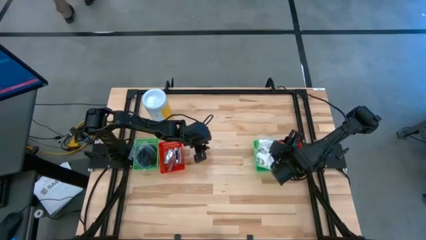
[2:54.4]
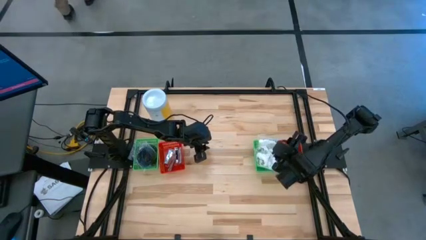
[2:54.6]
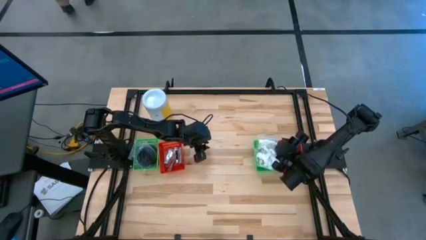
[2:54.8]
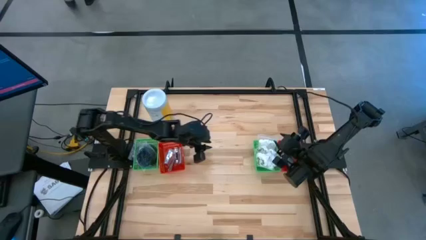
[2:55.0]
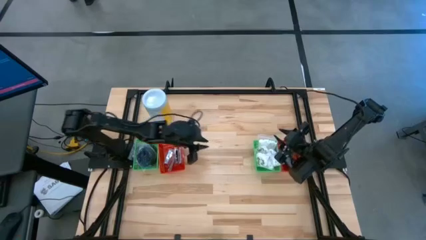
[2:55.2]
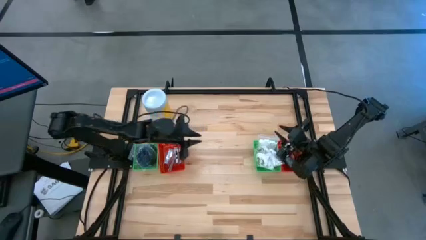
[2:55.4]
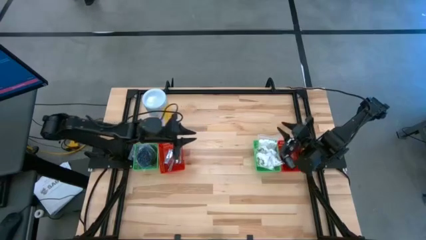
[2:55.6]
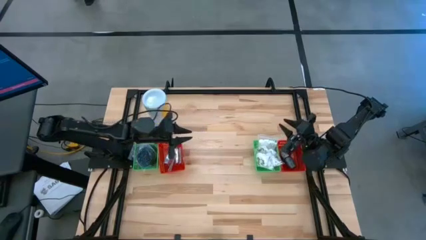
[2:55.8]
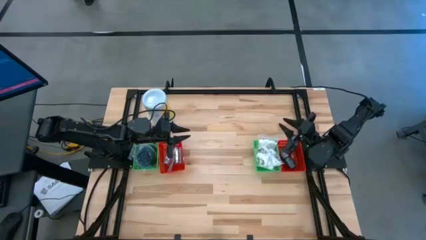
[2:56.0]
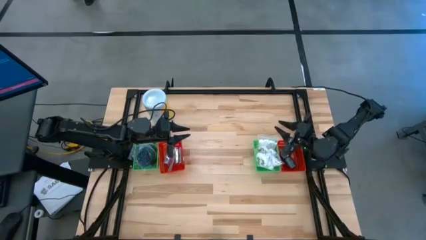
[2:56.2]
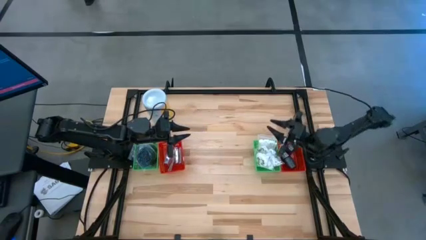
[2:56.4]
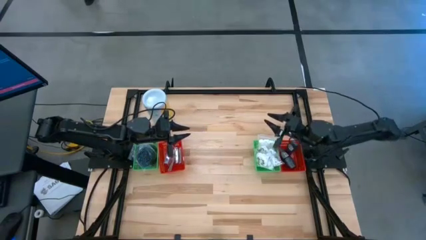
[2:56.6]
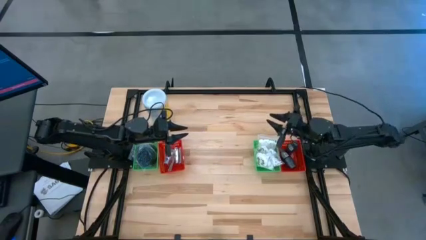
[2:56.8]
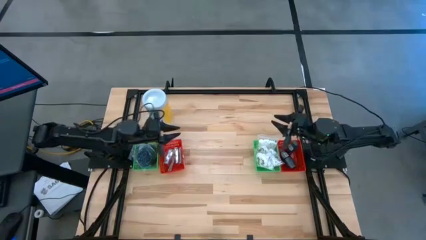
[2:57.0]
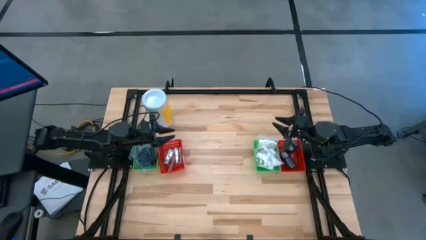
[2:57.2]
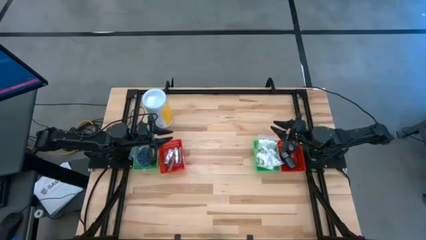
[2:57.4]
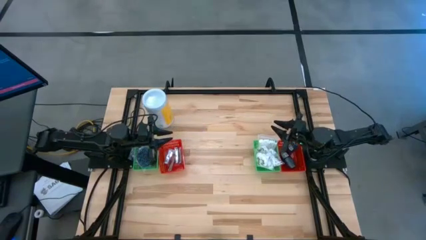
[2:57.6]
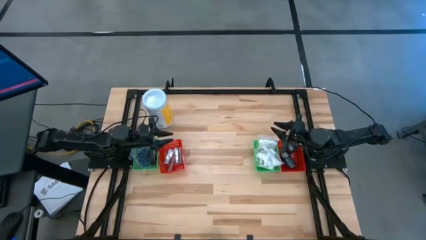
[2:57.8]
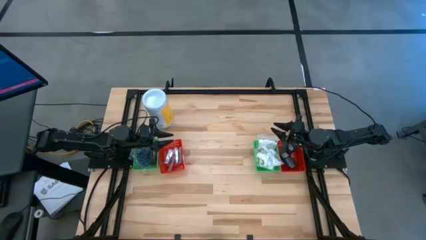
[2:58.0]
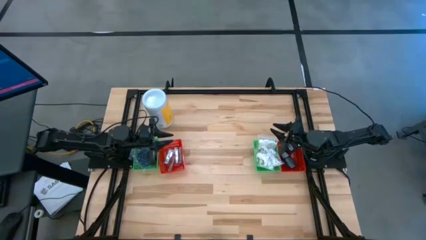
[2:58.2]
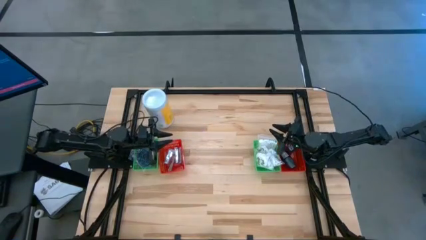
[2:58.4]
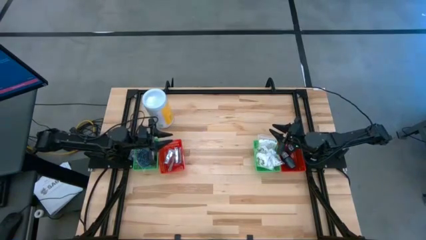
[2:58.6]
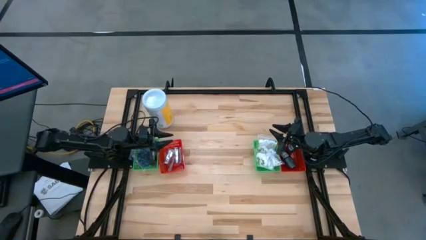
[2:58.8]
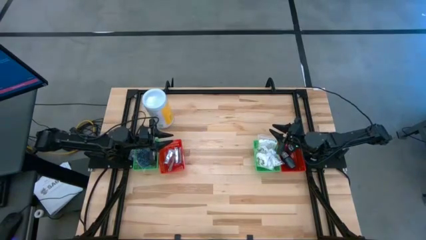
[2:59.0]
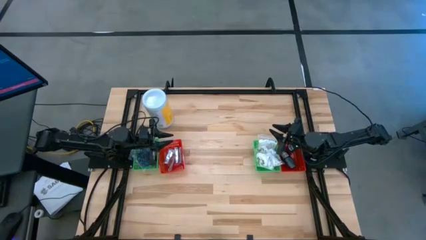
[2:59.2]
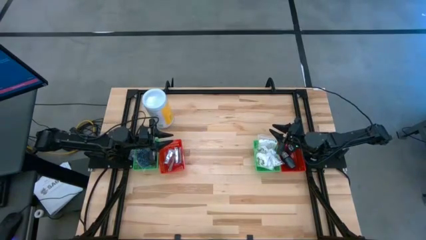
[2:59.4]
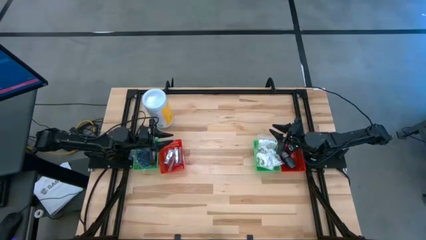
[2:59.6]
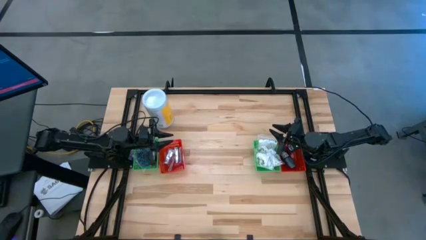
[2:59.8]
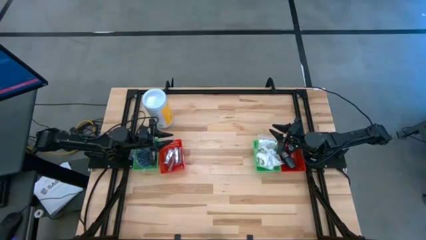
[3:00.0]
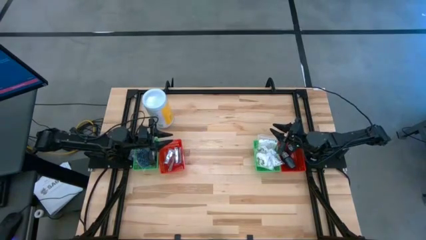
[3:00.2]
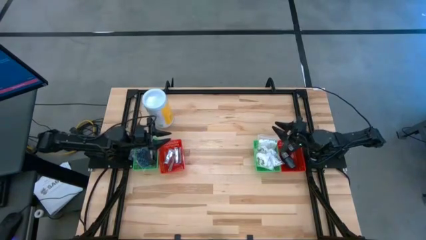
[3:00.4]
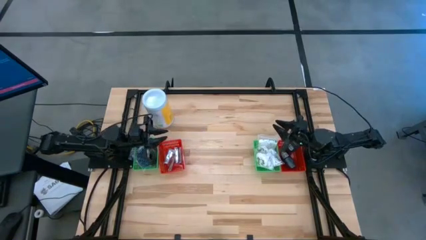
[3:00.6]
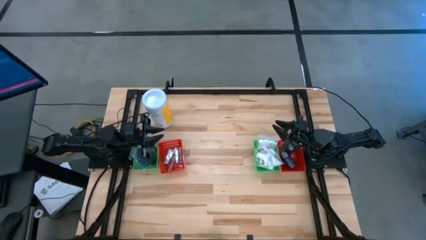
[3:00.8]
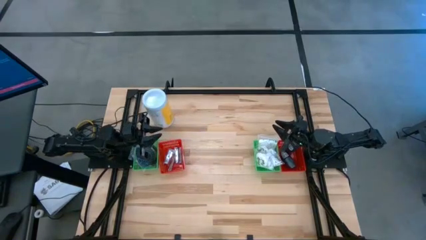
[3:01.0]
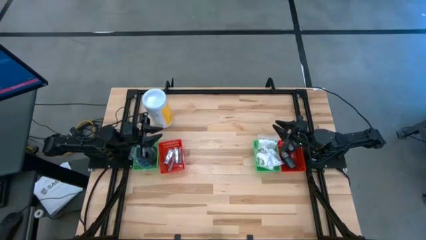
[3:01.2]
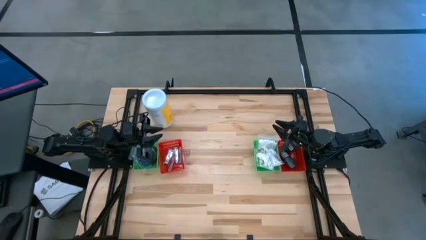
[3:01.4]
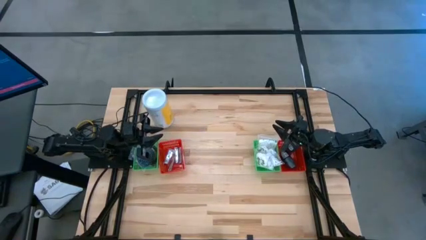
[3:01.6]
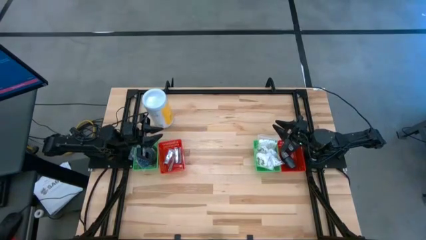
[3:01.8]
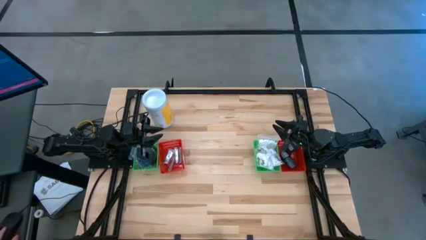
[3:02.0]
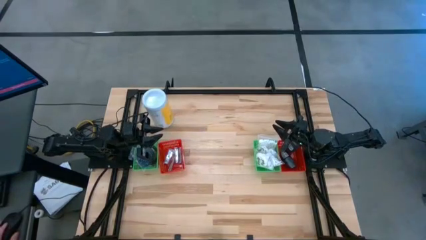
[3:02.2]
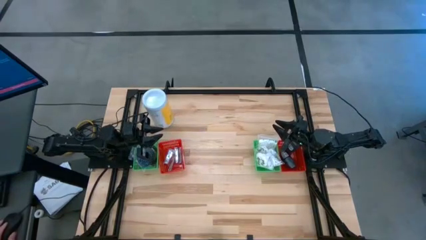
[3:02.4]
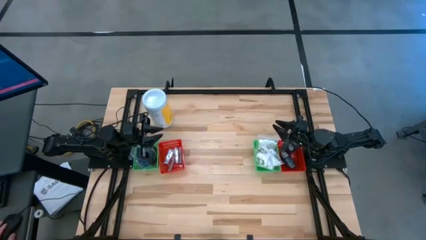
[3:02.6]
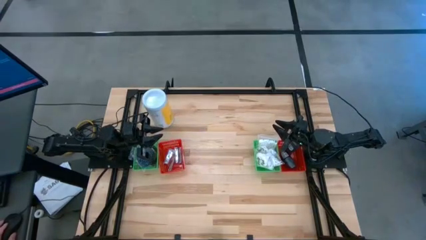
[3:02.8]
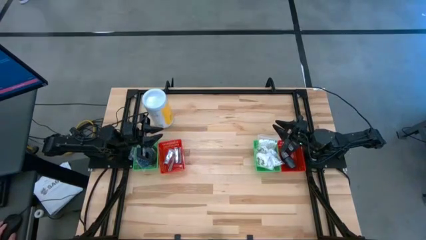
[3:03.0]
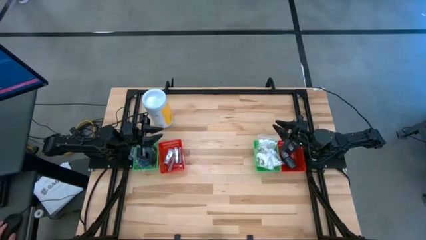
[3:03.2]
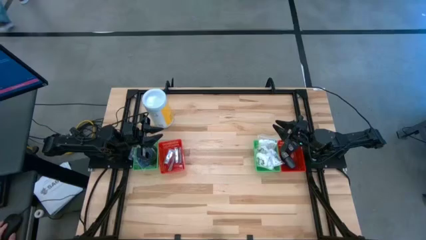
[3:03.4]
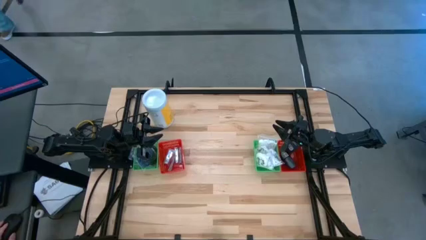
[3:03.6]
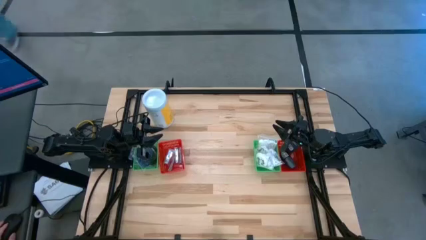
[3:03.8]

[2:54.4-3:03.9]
Task: Pick & Place Travel size toiletries
Return to Home Position

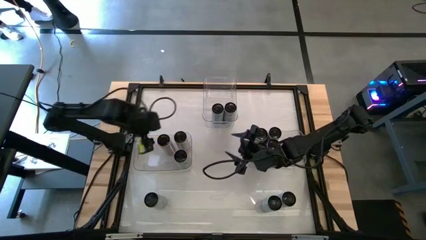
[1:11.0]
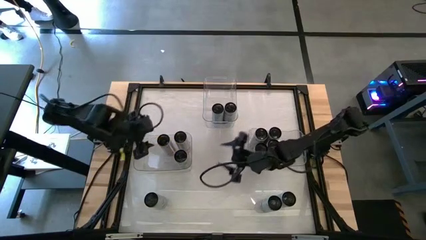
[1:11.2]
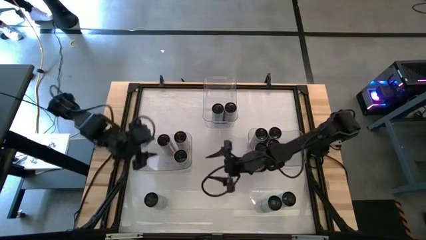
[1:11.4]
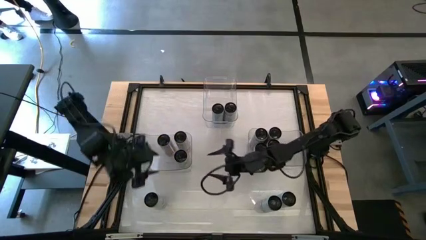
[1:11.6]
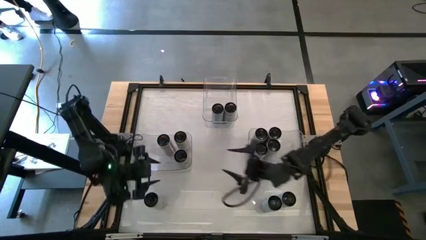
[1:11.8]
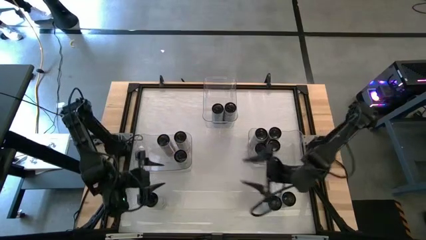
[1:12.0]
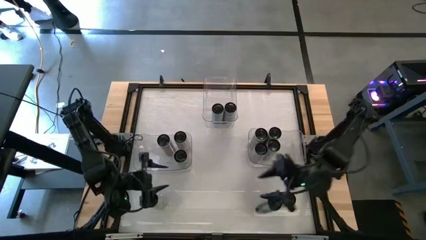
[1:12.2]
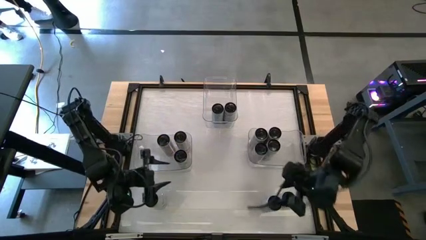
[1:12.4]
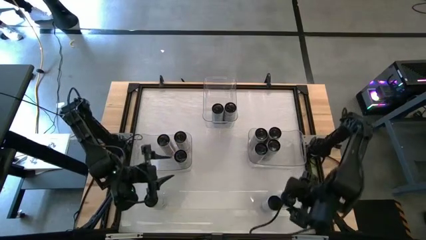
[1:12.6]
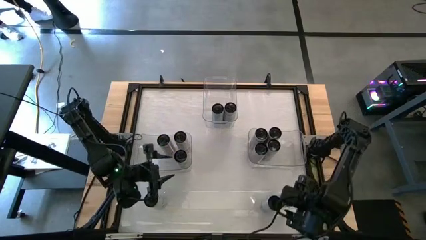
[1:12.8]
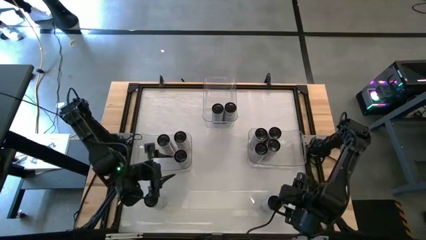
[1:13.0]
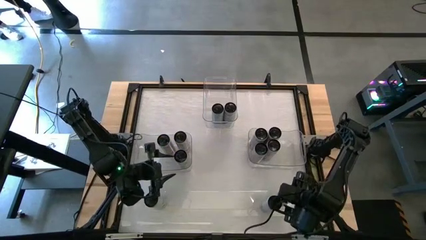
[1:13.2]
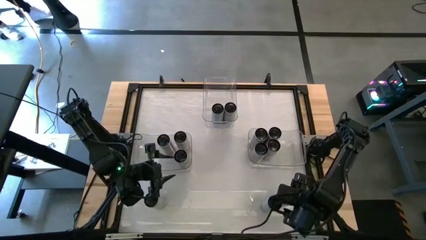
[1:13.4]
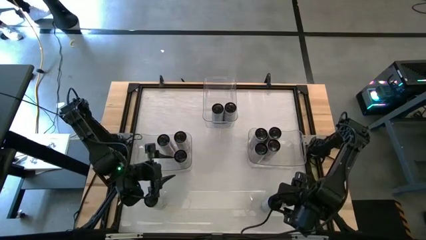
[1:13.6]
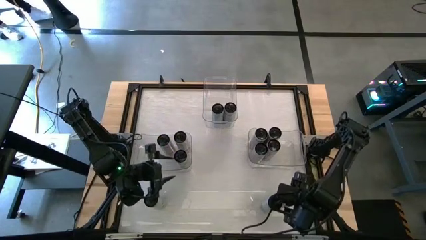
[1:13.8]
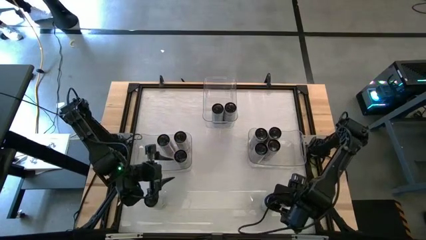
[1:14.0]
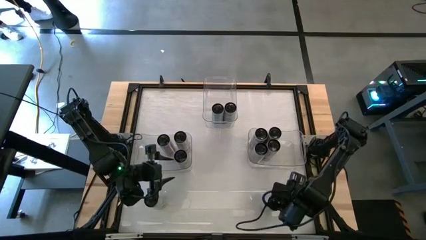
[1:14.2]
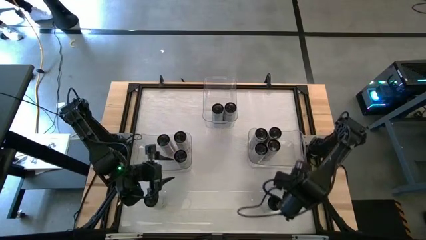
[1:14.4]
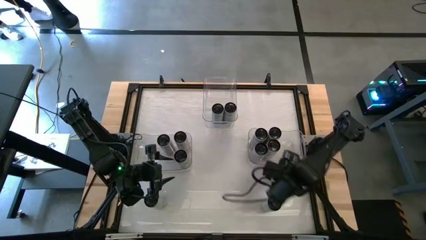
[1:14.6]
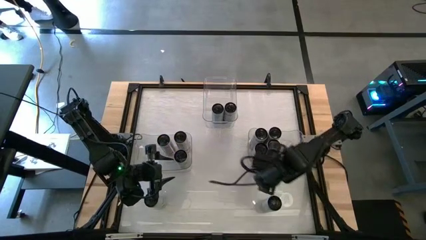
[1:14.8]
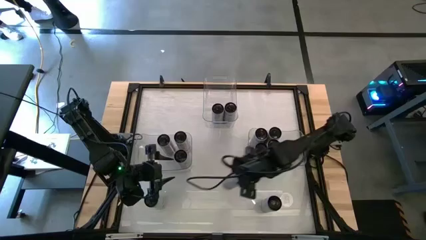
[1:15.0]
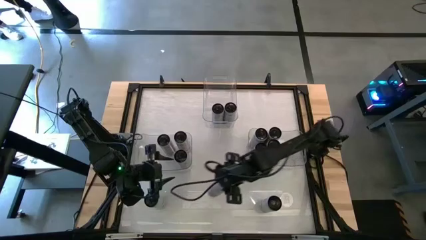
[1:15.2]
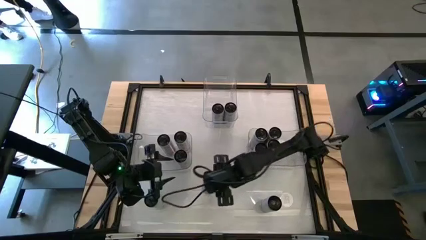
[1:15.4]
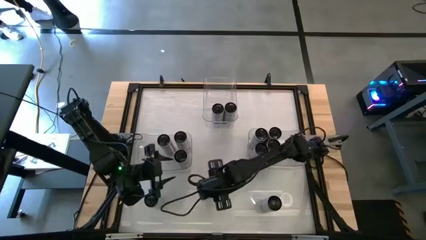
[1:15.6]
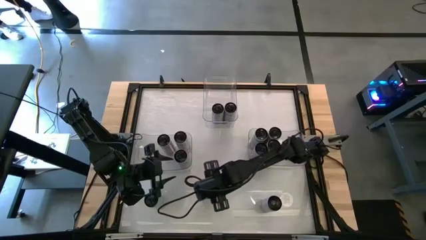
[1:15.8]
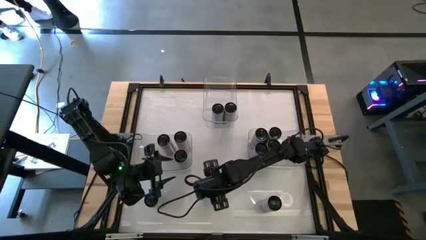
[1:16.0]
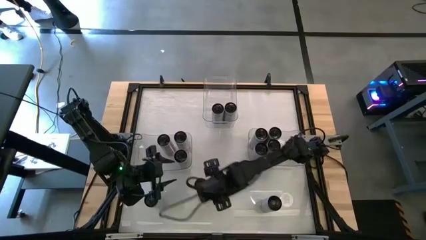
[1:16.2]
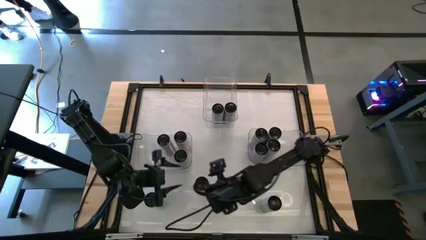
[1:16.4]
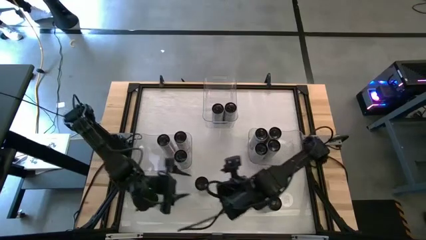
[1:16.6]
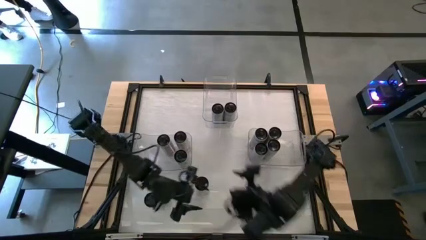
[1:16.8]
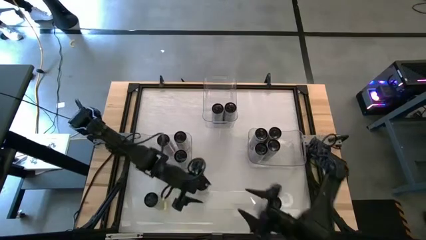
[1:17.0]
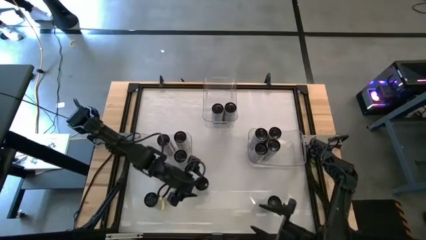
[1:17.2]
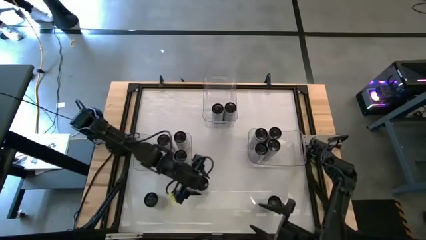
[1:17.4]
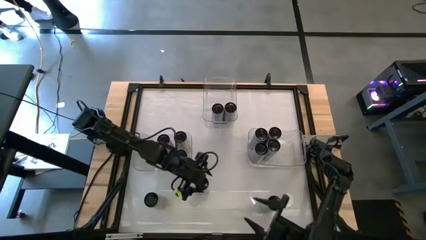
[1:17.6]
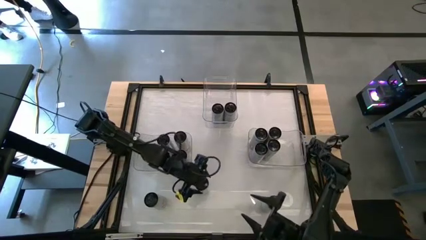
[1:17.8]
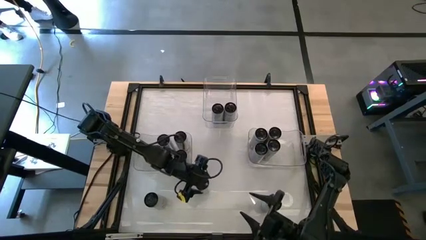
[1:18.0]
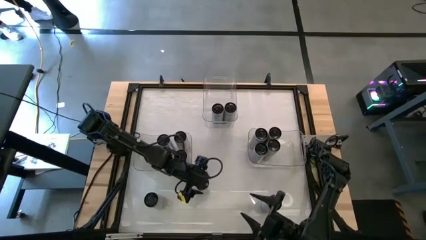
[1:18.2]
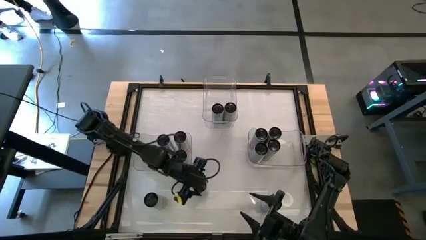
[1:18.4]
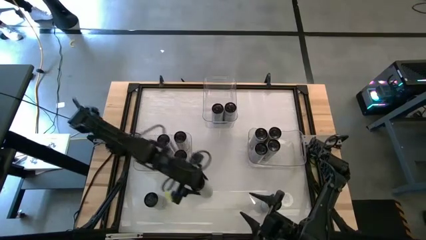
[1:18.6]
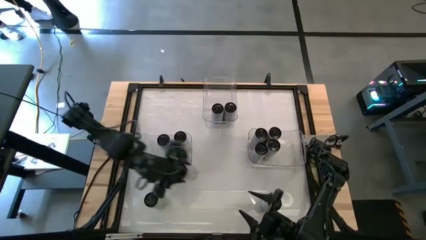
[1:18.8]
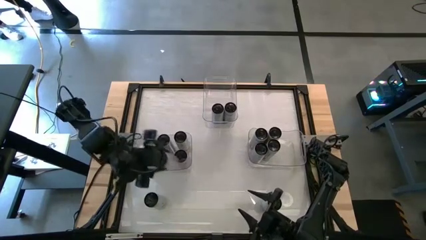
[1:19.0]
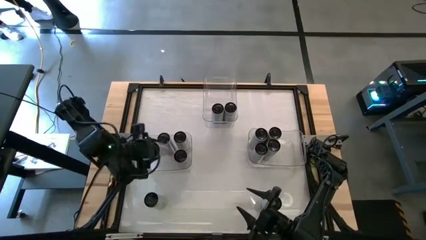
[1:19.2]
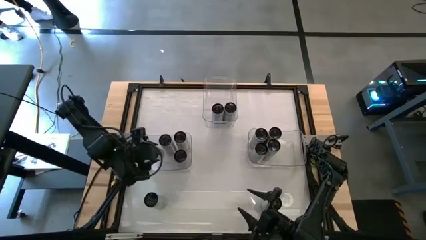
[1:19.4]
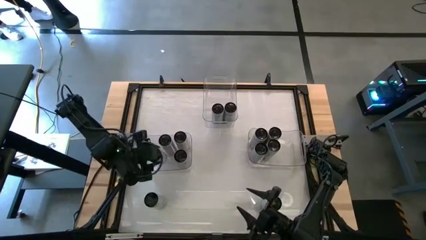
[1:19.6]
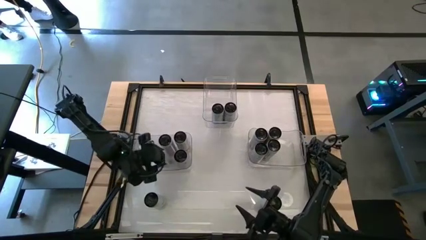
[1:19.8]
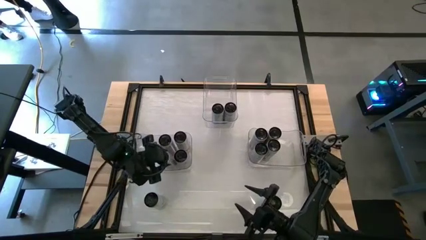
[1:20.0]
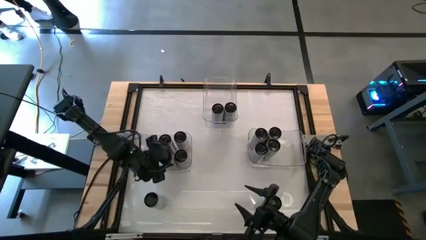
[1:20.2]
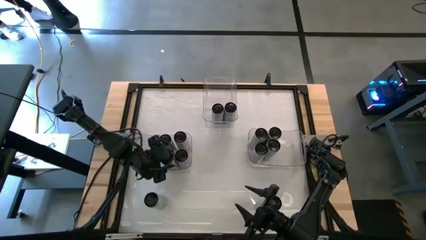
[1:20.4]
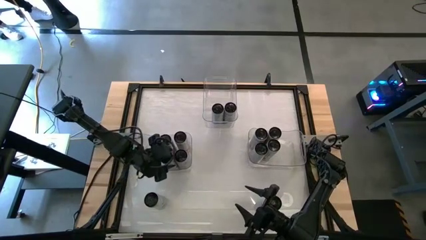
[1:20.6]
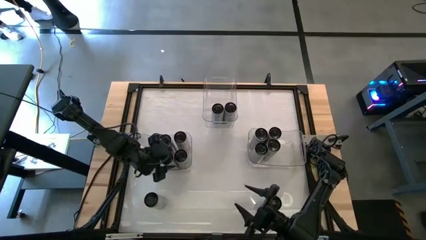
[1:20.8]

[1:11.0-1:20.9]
Task: Sort soda cans
Put the white-pink soda can into the bottom left transparent bin
